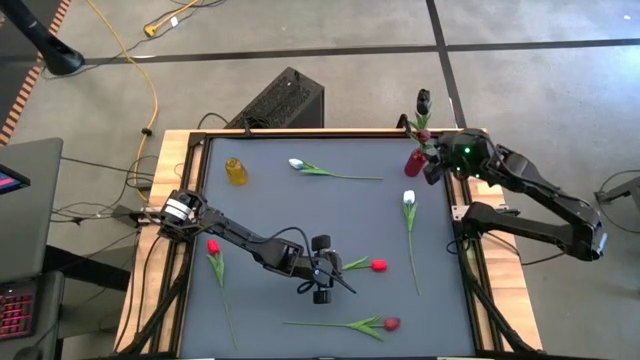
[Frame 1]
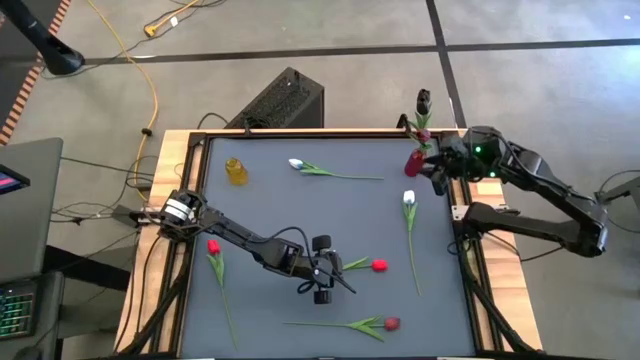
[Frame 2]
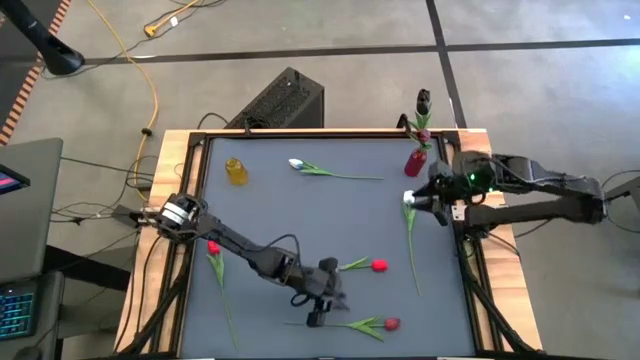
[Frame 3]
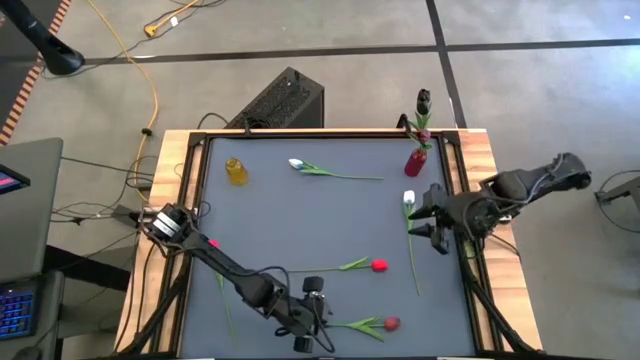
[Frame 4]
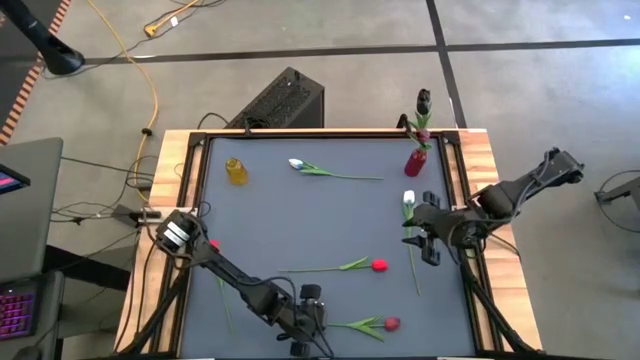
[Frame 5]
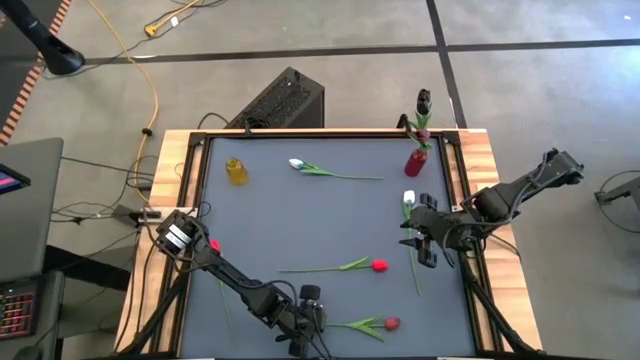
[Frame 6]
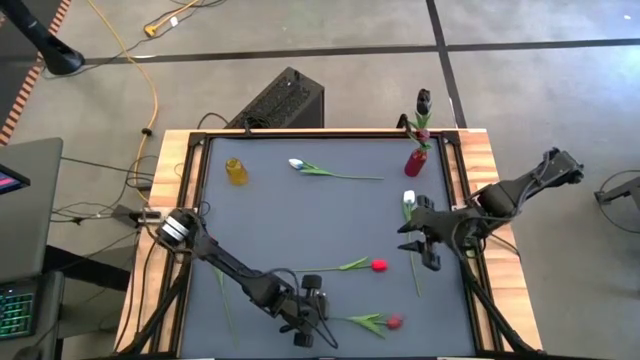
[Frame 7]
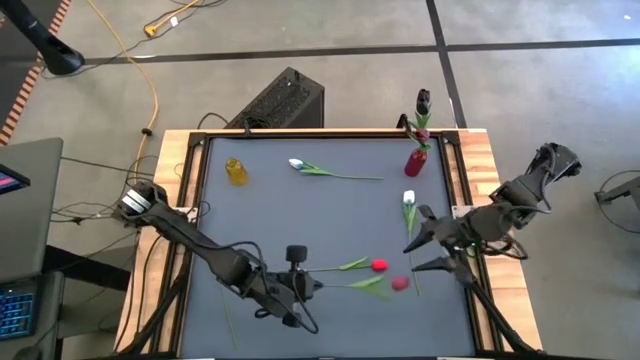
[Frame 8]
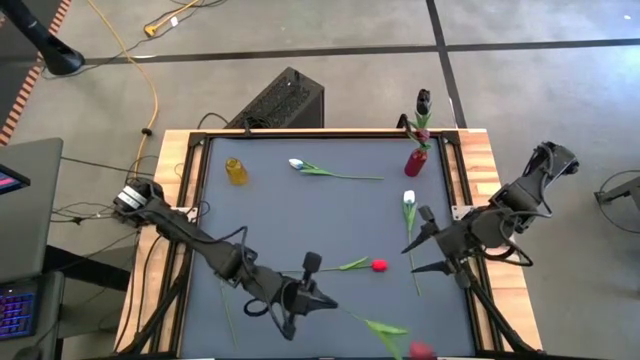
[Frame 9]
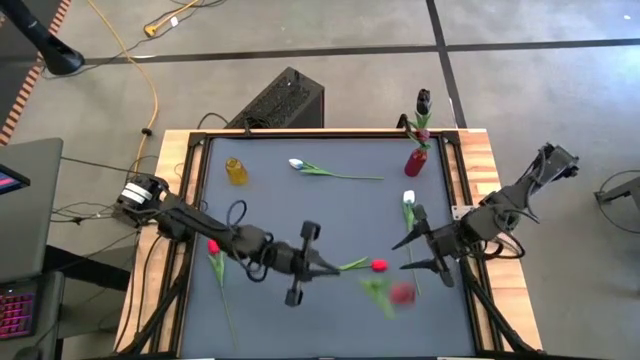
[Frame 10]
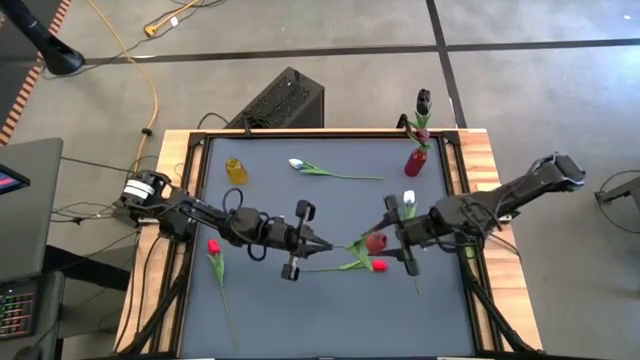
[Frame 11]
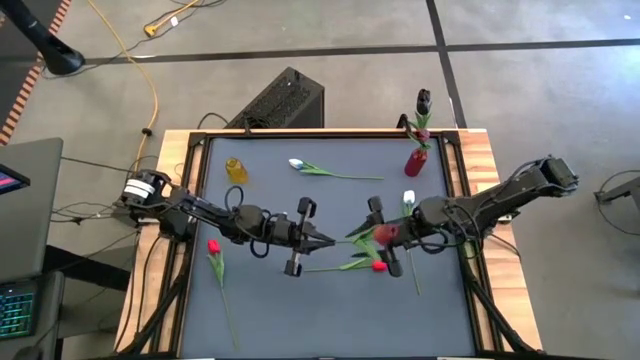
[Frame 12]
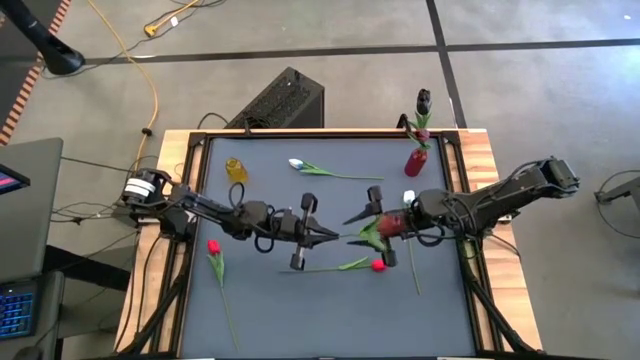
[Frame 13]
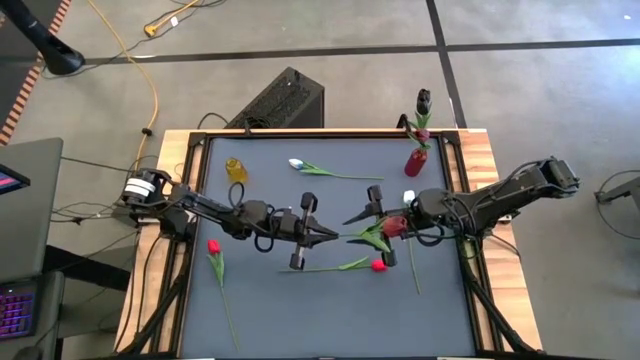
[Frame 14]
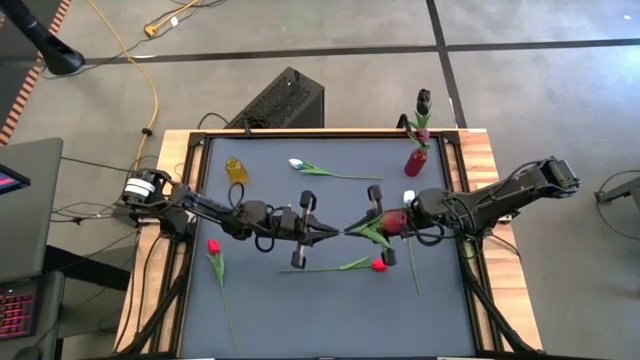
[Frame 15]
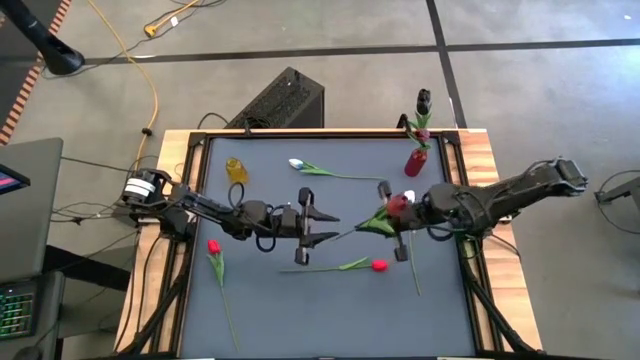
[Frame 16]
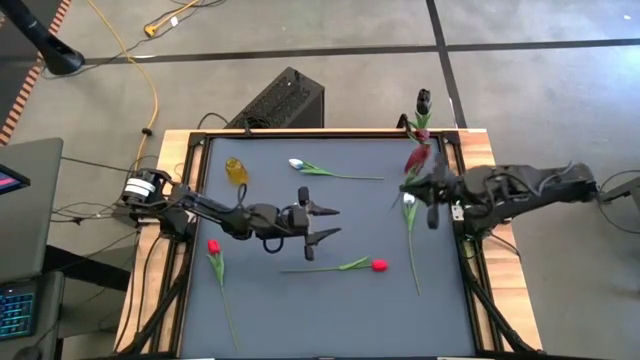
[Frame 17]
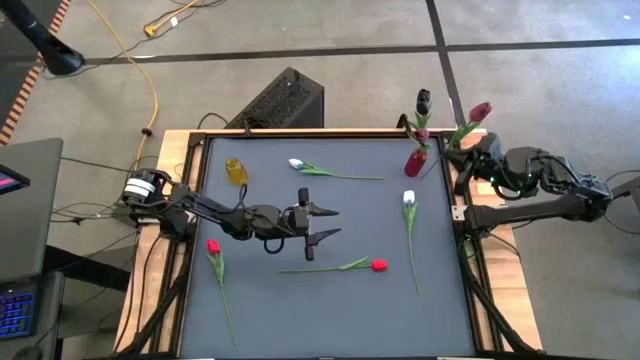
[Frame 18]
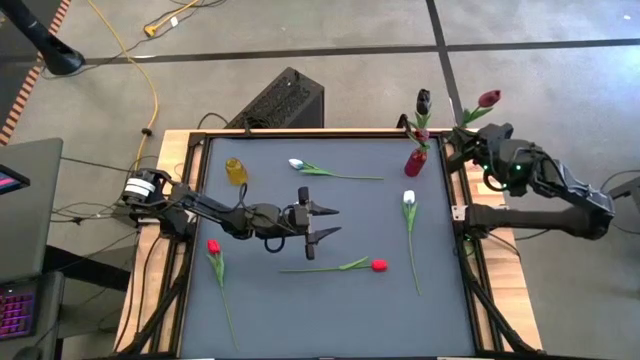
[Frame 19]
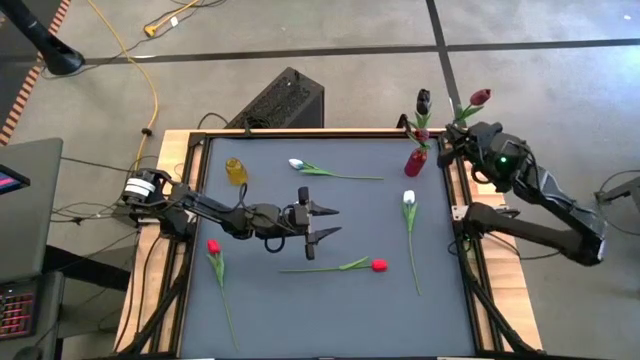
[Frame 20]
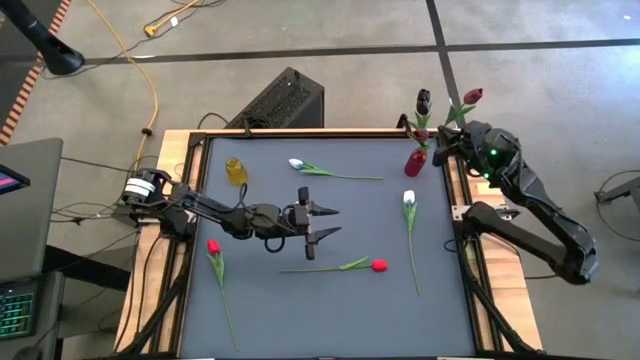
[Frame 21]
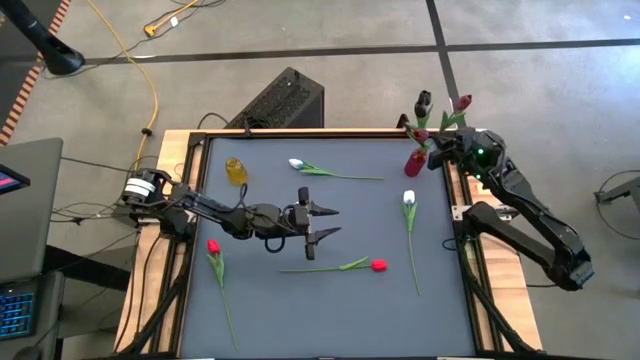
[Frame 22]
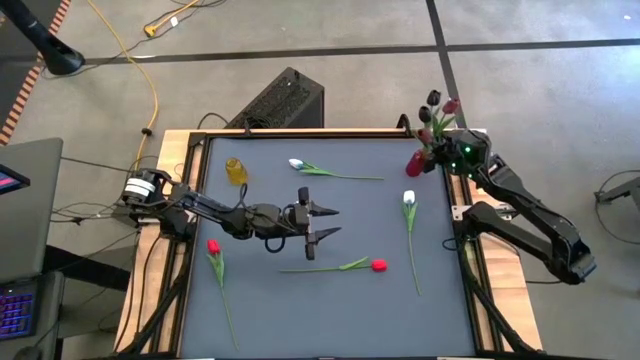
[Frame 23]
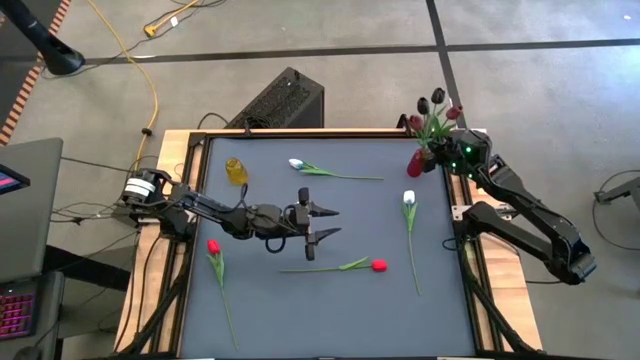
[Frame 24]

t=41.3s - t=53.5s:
Task: Sort flowers into vase by color
Put the dark red tulip into the red flower vase

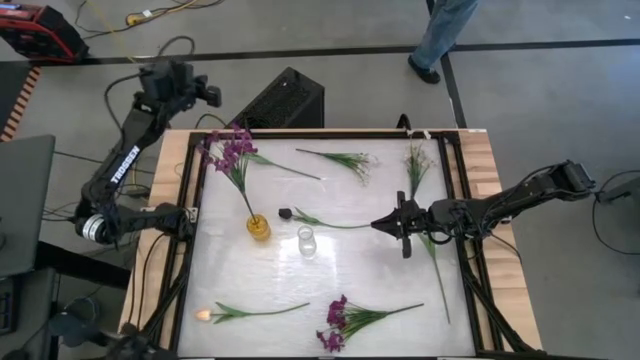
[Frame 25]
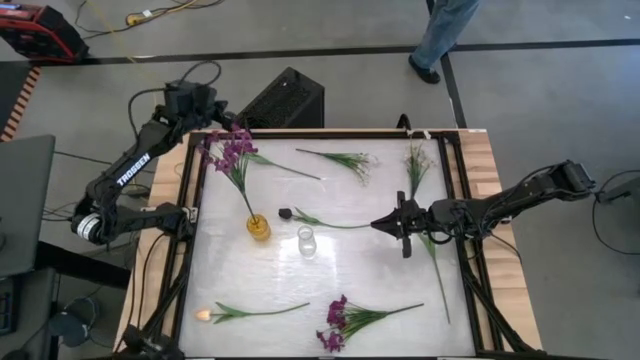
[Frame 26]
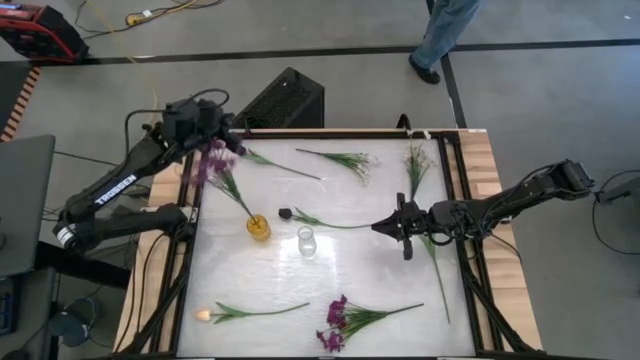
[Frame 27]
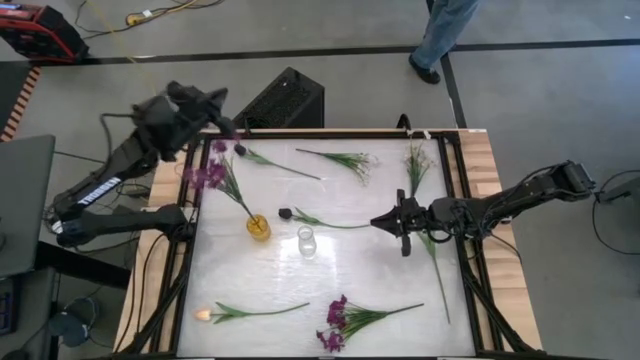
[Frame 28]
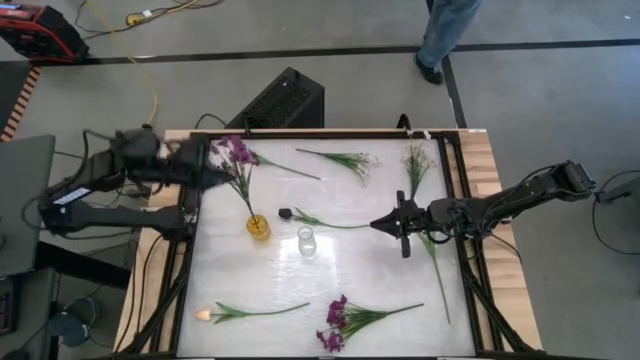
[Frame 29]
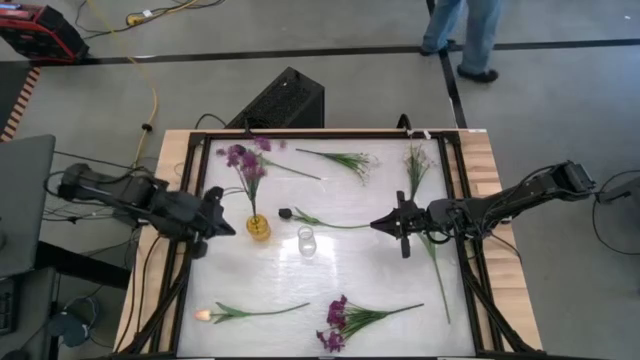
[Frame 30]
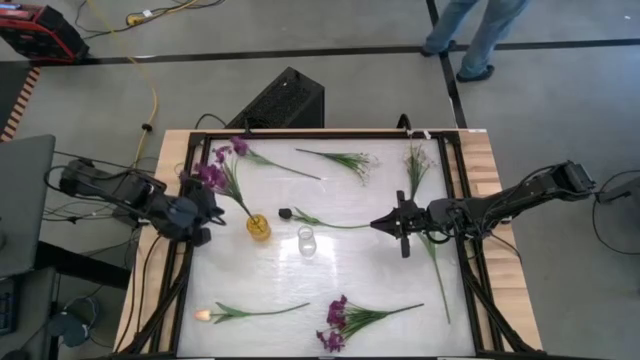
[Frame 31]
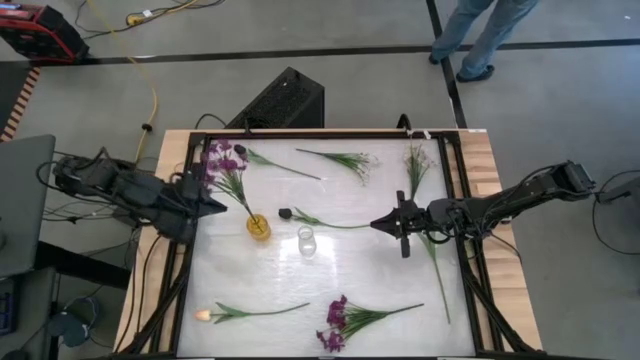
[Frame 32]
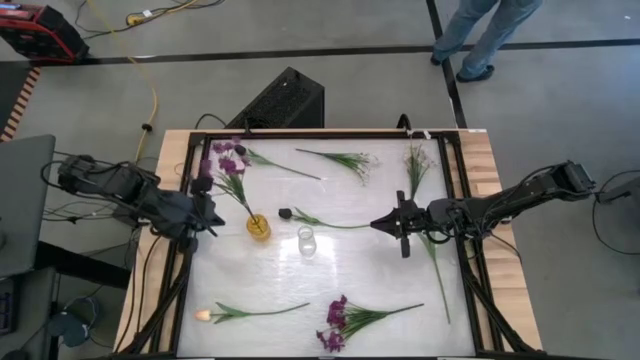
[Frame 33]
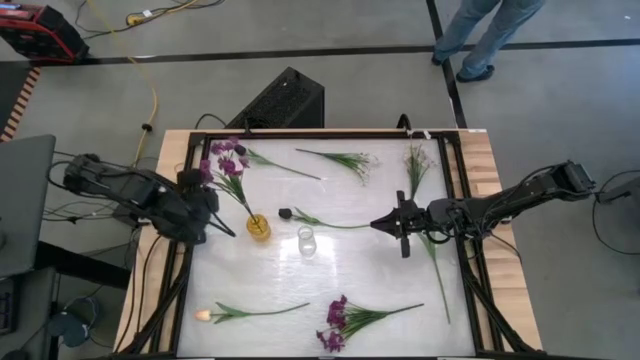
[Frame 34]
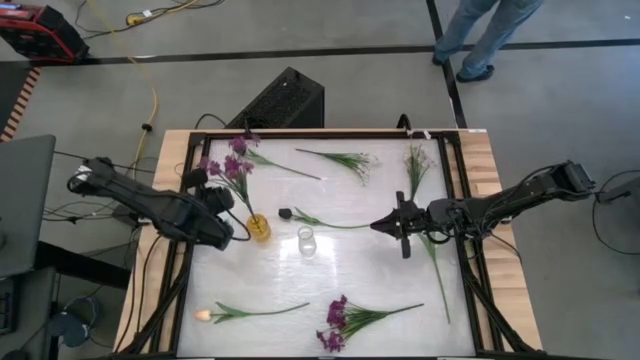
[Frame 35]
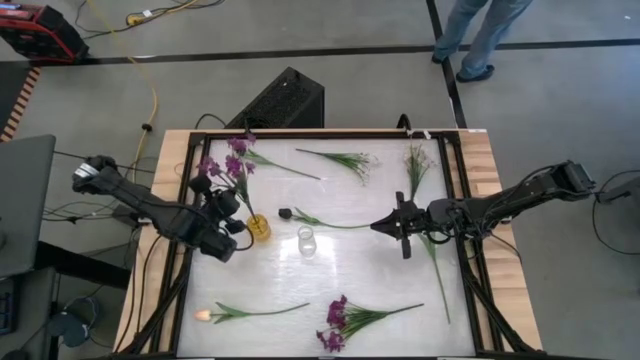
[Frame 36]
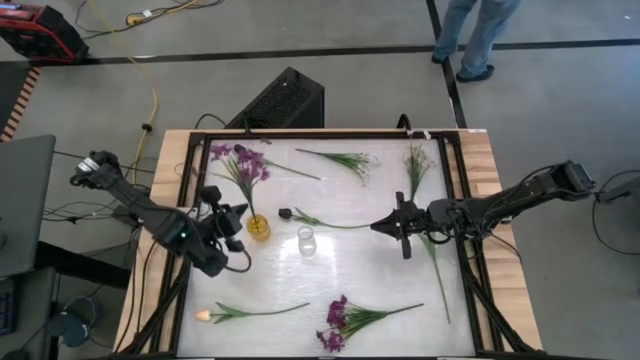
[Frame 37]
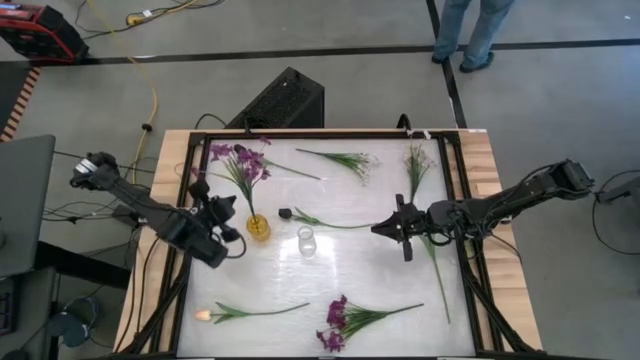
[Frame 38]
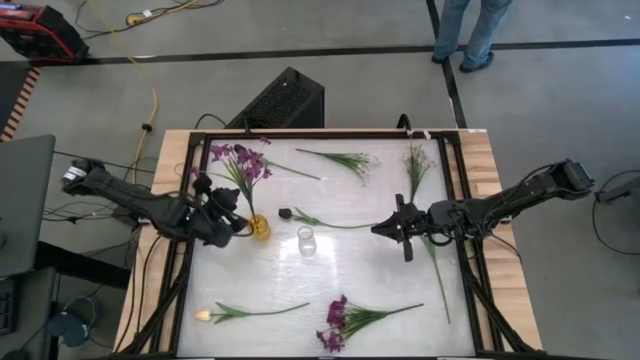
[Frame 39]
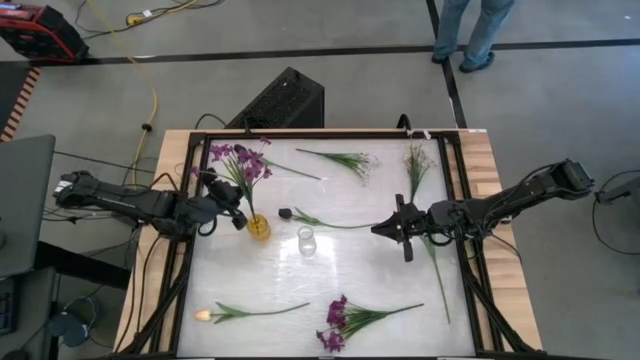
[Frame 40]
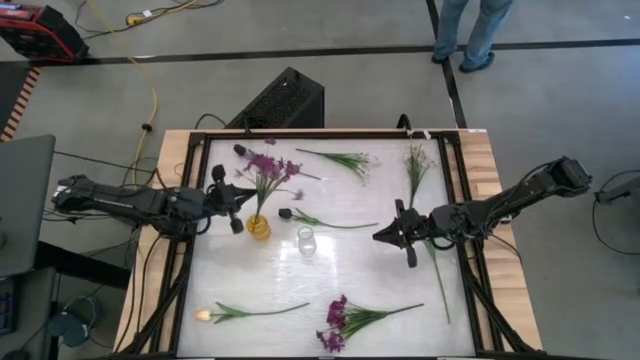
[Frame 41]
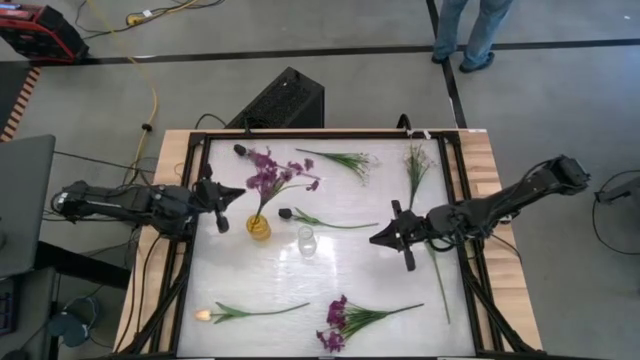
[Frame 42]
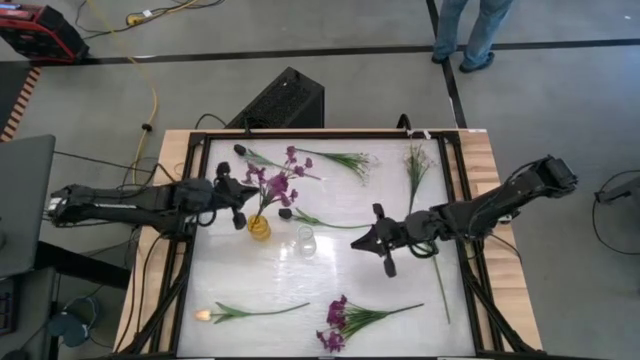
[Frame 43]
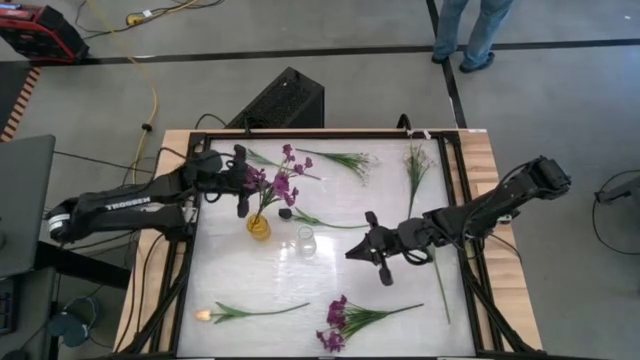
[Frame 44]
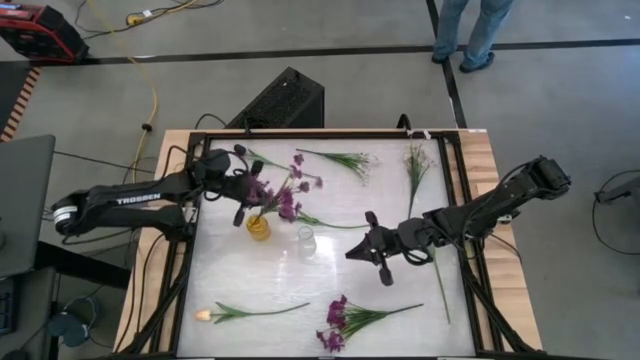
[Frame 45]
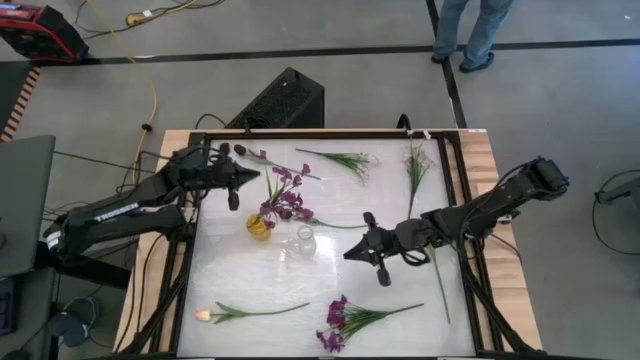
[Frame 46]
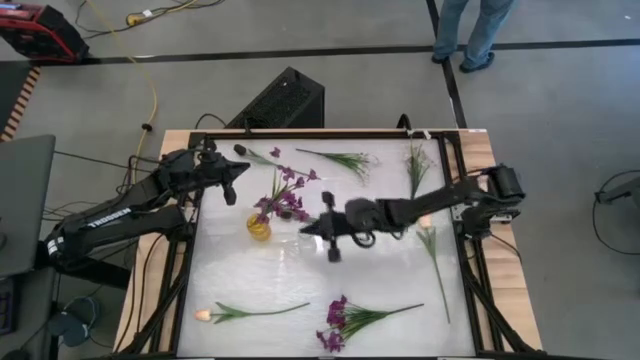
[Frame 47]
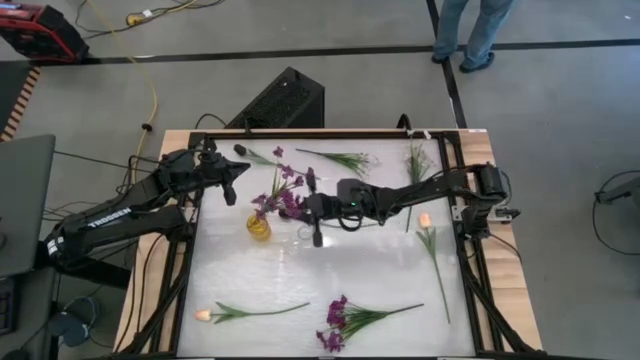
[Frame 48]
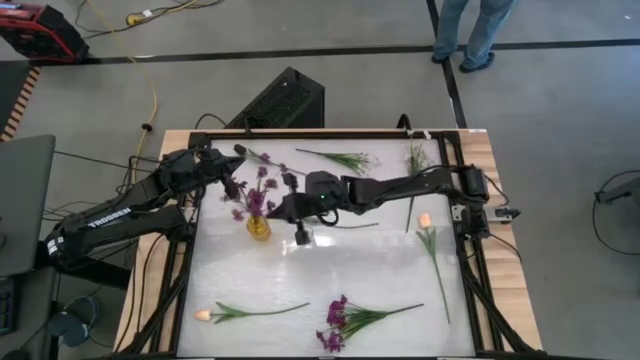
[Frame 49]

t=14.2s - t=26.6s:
Task: Sort flowers into vase by color
Put the top purple flower into the yellow vase
